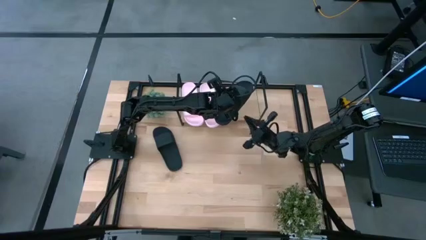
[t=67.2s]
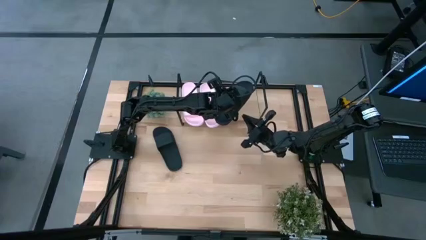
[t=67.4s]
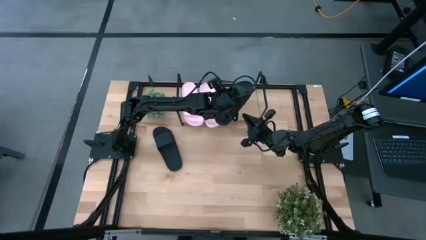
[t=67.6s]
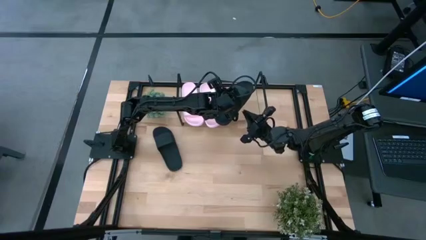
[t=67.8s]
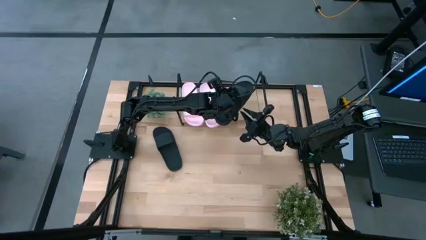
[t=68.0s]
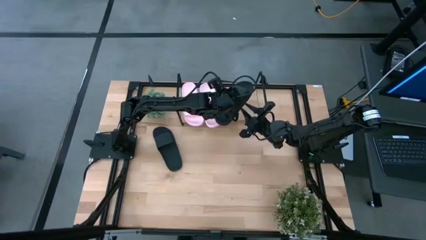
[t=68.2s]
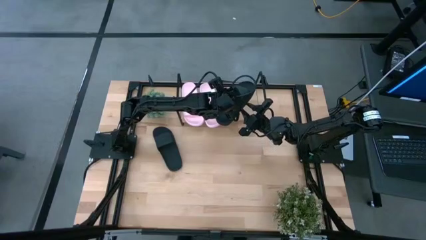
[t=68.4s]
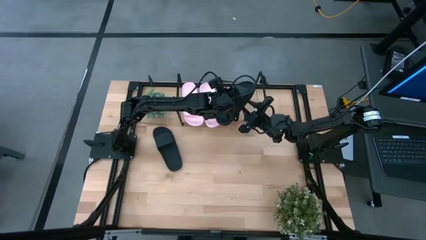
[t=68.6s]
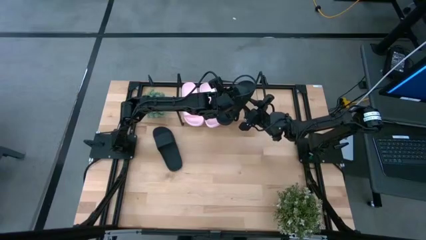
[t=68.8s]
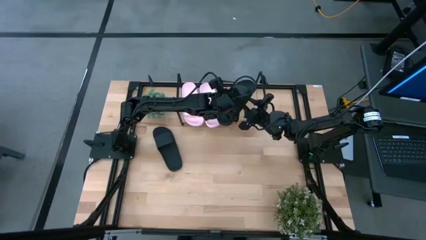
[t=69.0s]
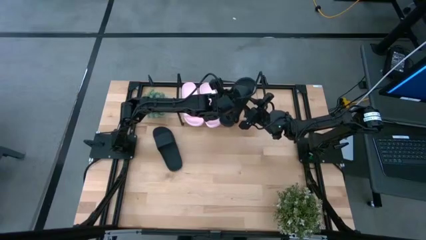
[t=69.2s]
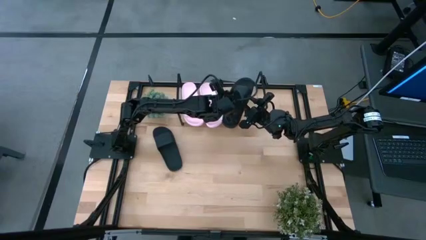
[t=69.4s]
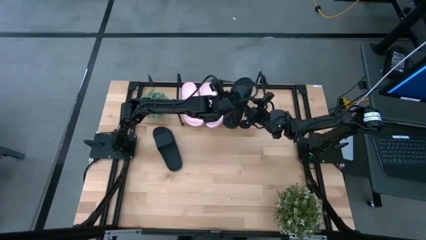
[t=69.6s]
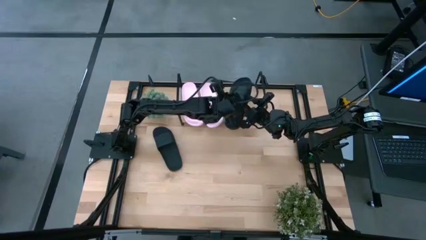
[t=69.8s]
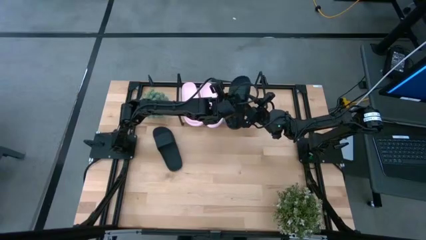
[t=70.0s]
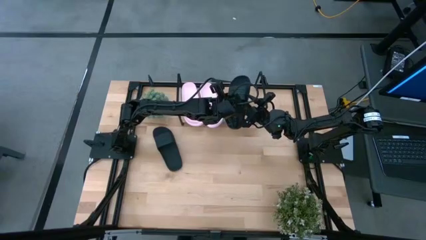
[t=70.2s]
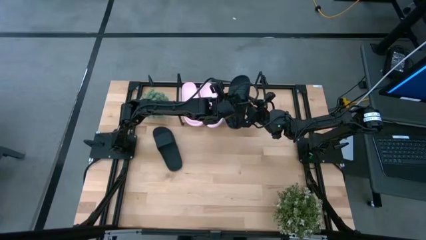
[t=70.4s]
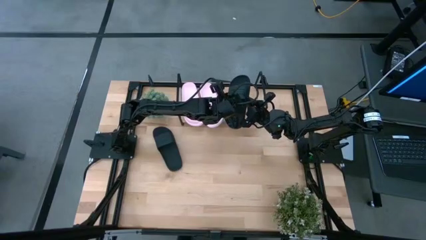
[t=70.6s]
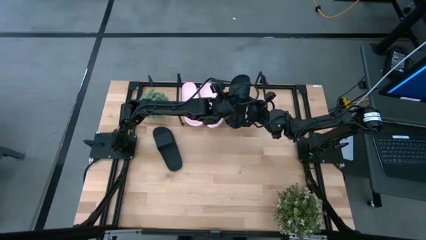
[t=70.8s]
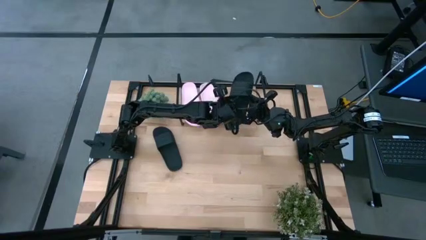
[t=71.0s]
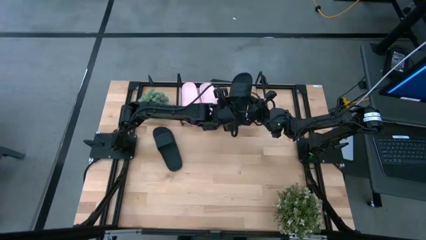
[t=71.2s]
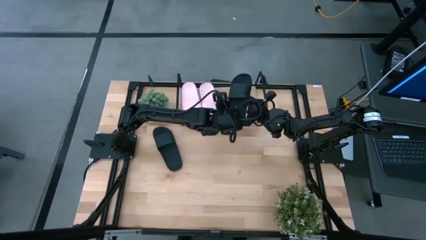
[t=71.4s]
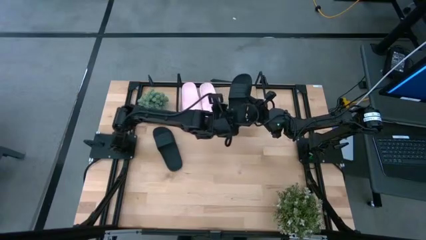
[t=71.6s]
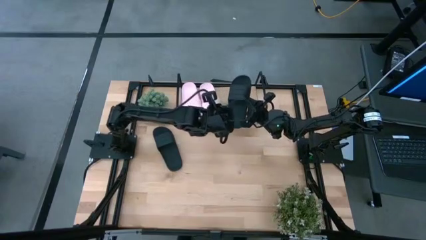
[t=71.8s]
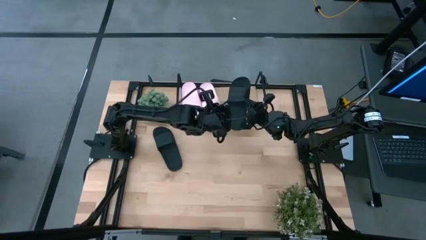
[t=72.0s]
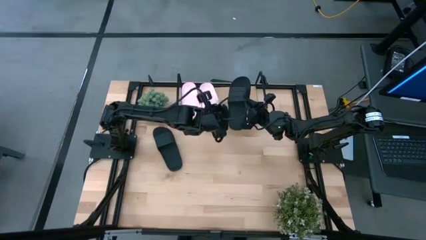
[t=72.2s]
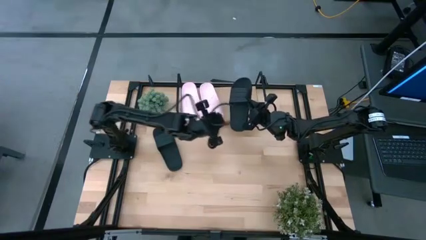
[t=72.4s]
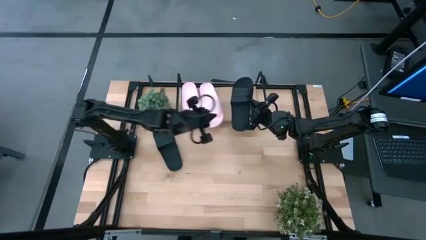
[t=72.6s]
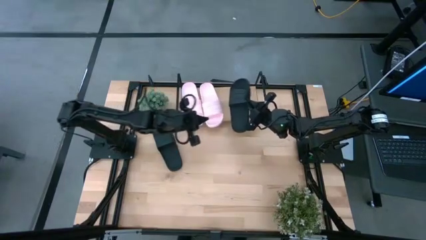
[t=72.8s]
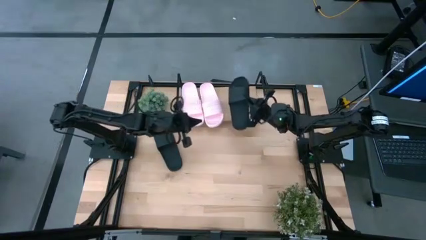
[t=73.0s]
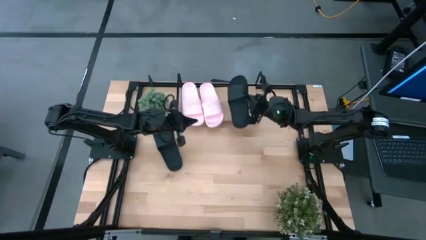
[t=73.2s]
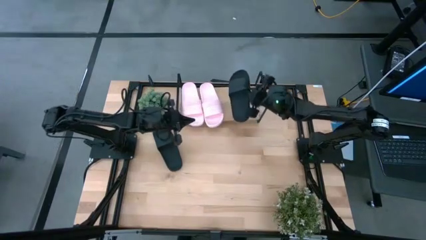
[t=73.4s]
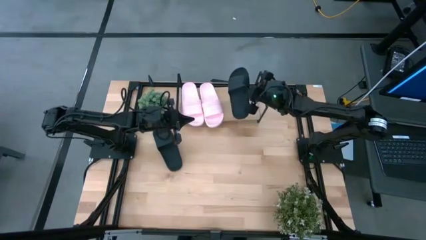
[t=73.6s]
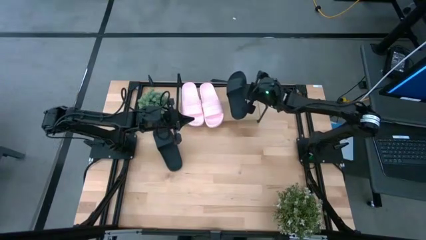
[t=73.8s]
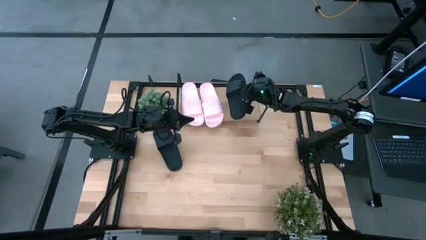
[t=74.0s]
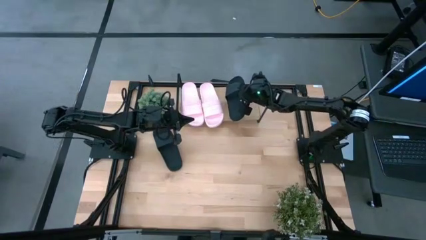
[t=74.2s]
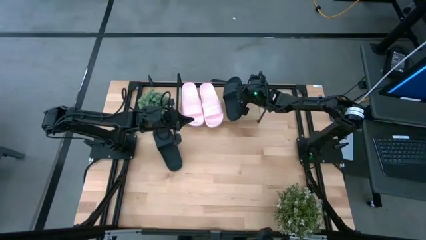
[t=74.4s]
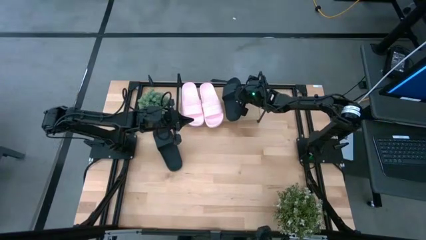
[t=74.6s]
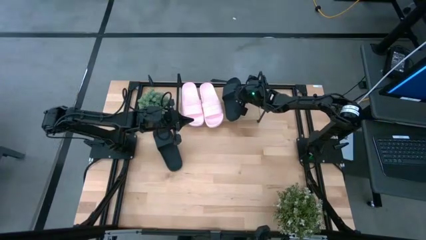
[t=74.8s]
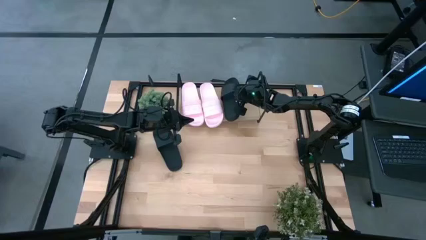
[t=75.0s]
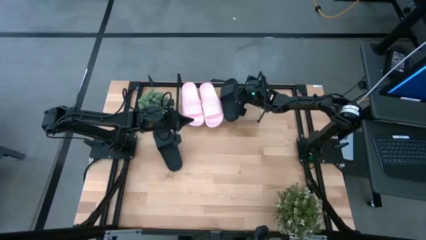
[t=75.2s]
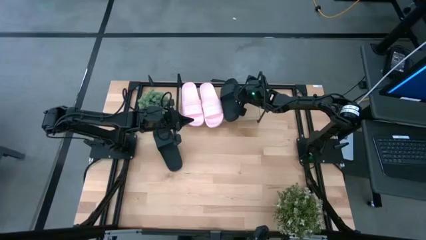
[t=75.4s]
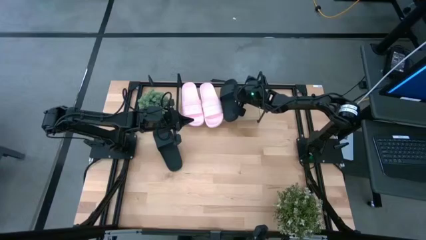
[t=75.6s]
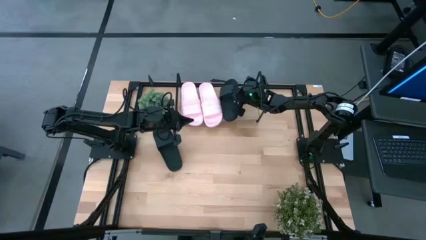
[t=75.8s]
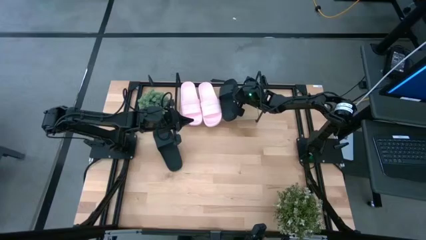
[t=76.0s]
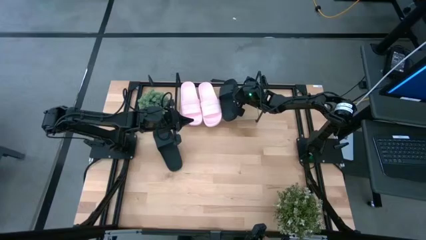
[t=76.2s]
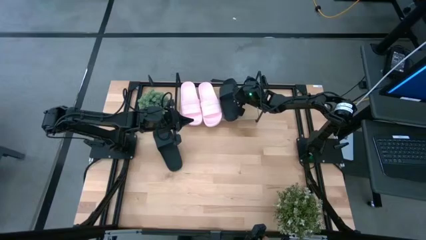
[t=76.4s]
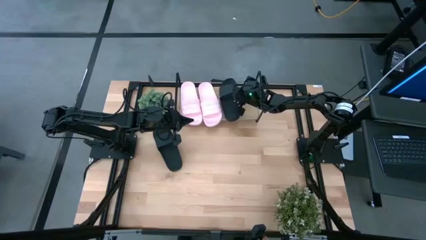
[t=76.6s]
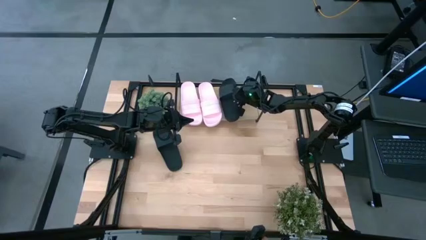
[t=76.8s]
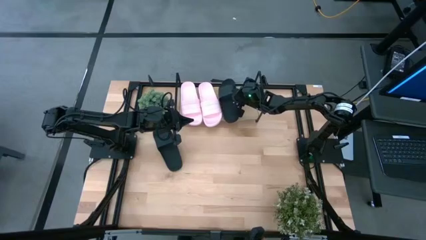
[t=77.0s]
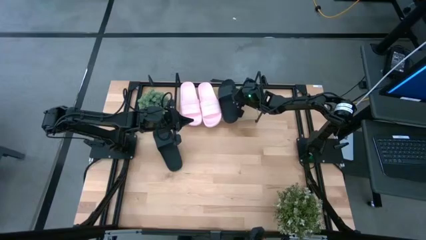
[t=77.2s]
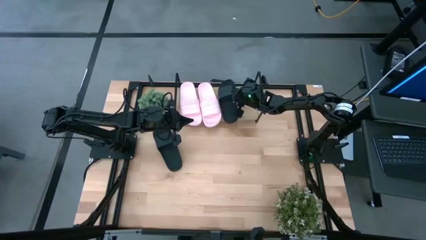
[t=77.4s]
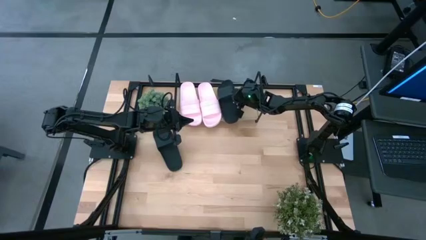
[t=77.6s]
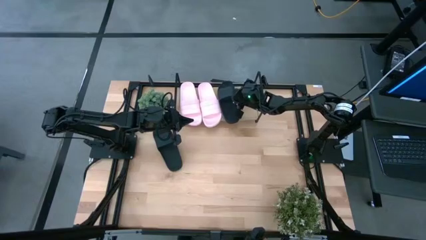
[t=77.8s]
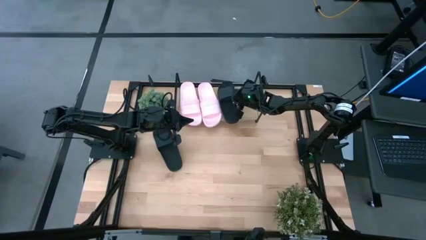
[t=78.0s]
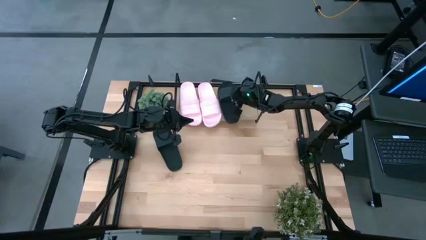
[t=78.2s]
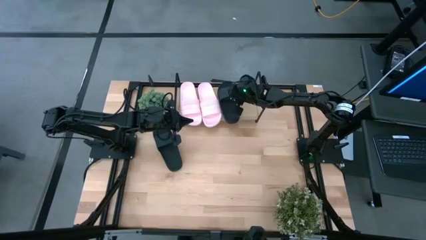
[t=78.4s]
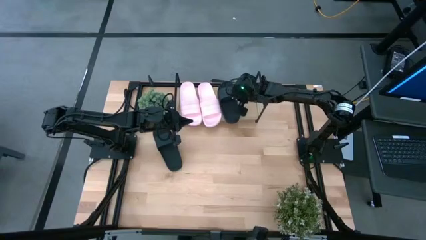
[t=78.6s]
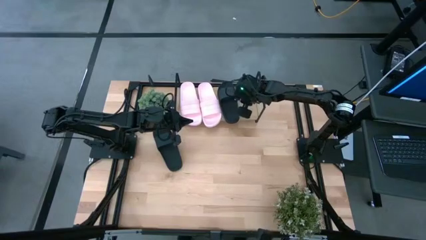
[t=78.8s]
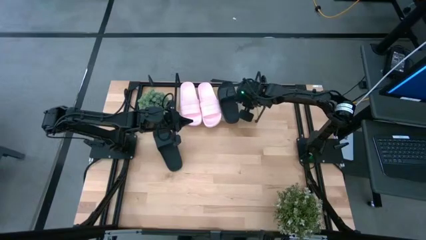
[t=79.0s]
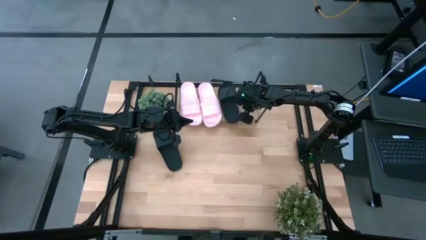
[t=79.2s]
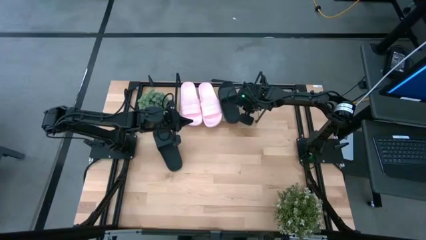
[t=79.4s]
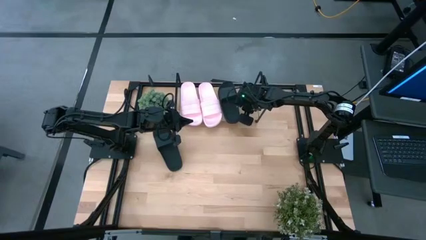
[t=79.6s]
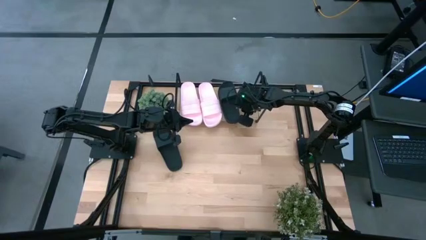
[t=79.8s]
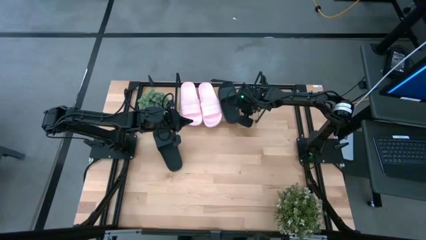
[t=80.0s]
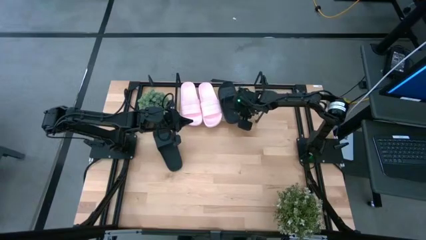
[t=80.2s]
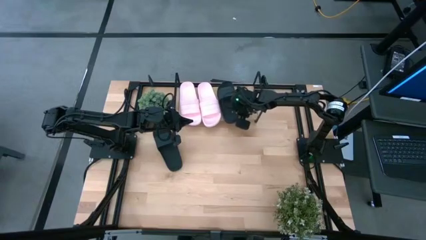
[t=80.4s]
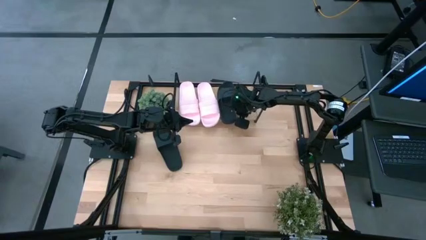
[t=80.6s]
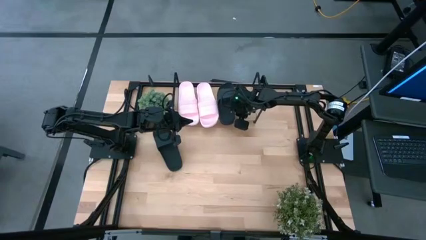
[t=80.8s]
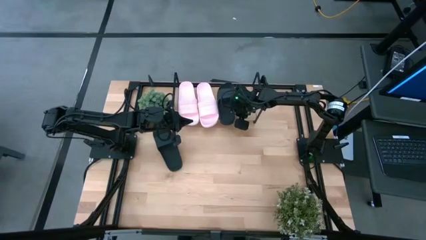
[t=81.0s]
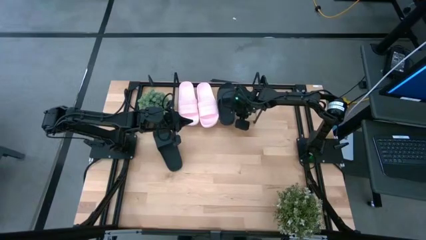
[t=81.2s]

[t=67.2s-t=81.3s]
Task: Pick and place slides into the shelf
Put the bottom black slides on the shelf

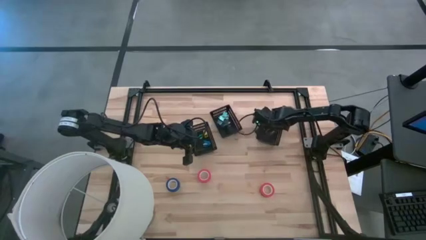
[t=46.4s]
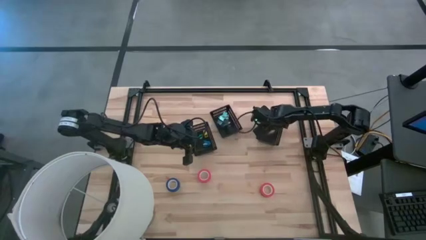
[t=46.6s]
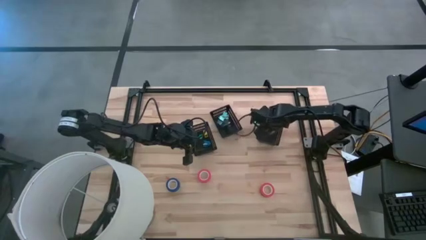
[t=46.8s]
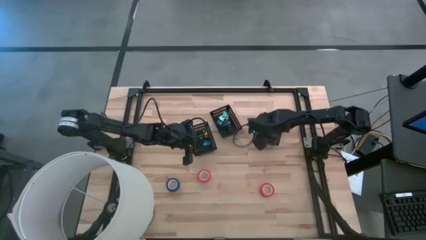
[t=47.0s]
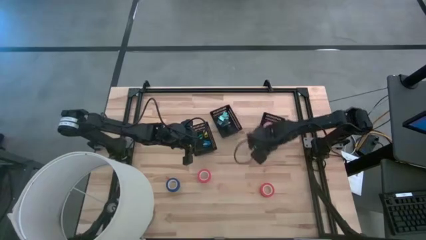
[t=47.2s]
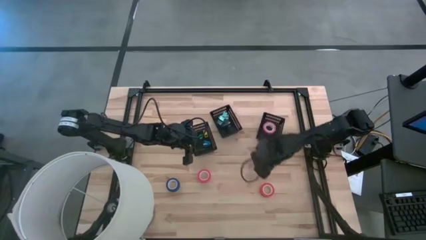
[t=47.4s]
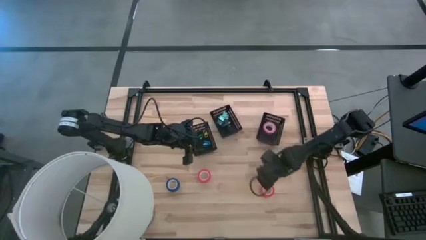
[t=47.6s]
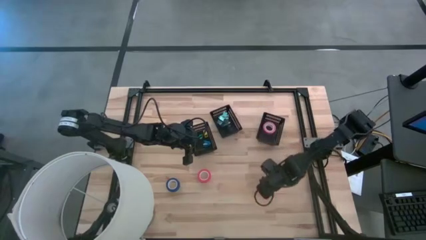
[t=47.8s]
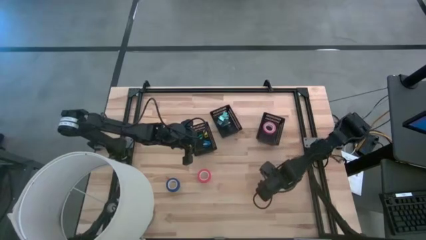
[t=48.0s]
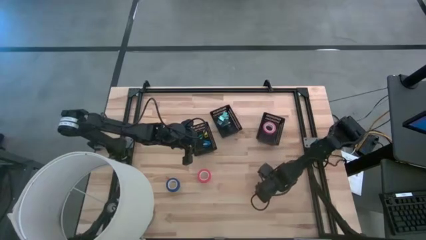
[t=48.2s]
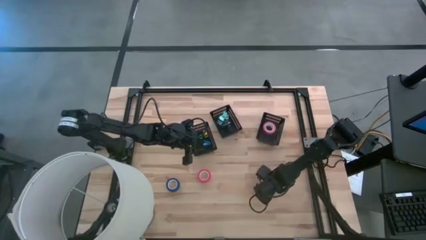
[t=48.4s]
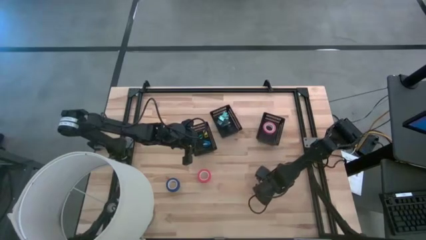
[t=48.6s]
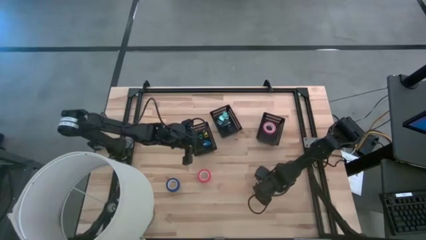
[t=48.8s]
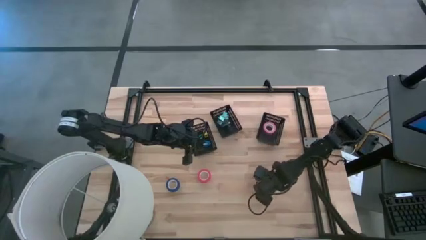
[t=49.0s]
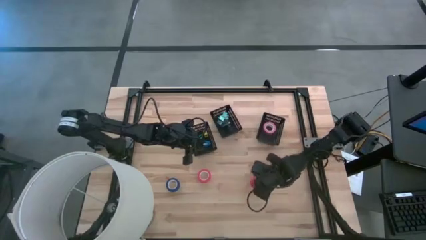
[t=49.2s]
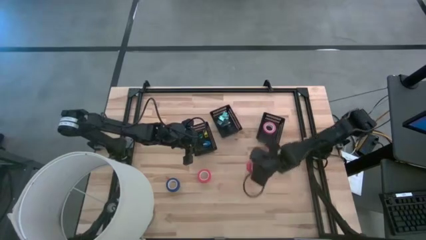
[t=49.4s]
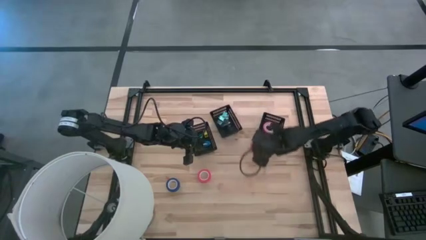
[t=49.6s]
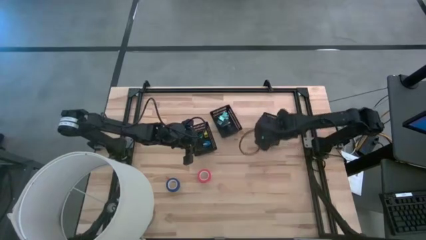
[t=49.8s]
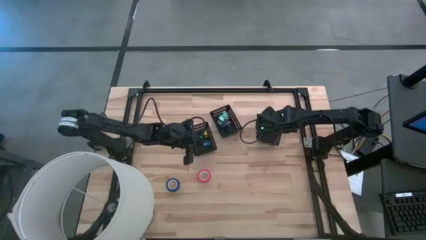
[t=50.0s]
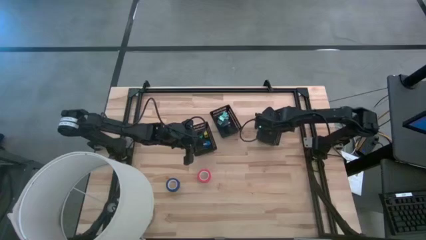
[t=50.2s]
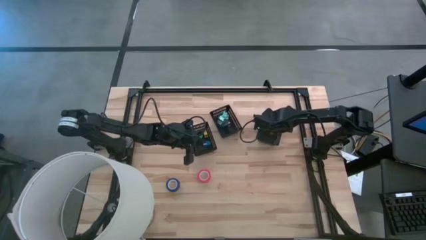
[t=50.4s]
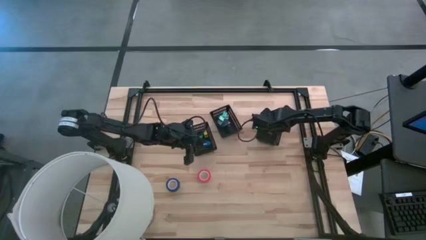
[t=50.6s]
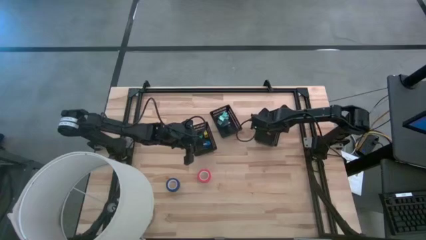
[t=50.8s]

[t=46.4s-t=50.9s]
Task: Pick and place Stapler, Stapler remover, tape
Put the right orange tape into the right black basket
